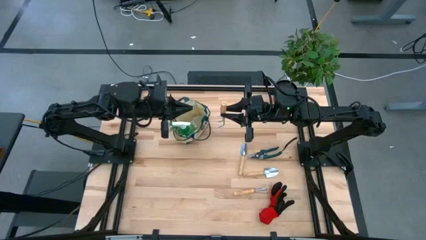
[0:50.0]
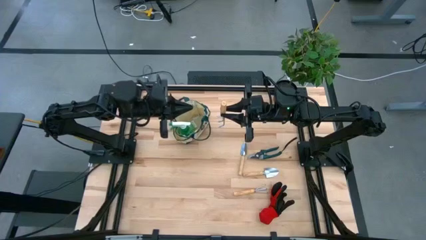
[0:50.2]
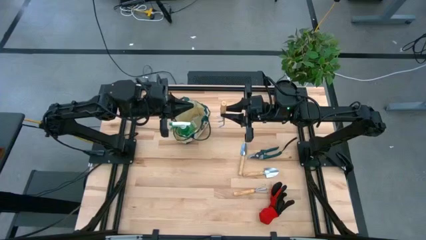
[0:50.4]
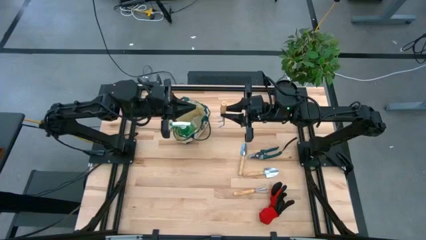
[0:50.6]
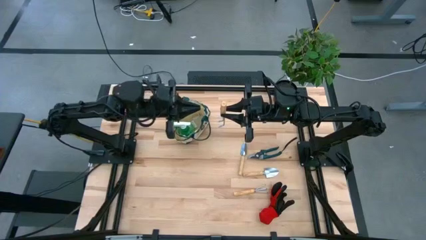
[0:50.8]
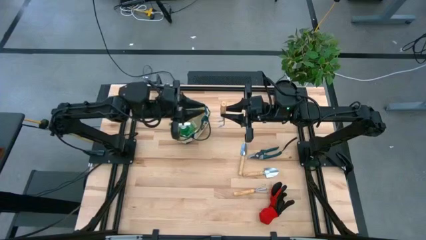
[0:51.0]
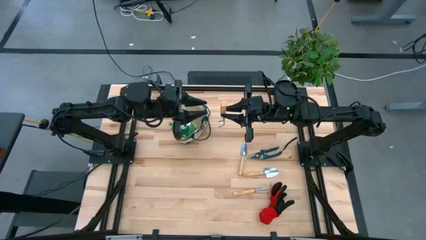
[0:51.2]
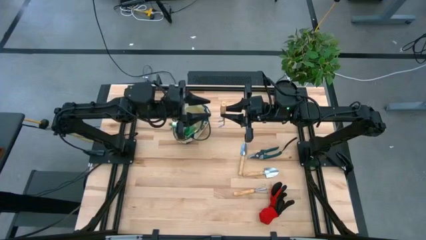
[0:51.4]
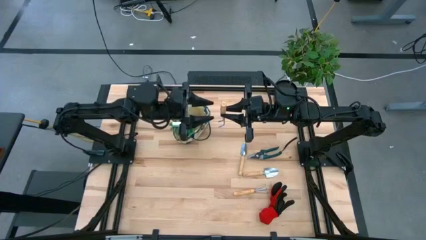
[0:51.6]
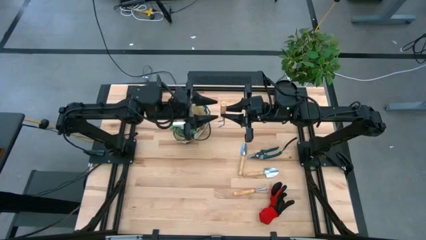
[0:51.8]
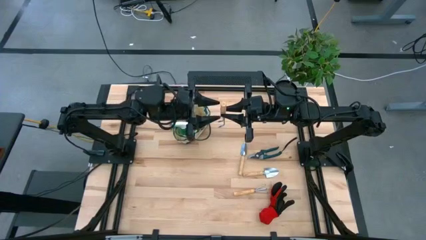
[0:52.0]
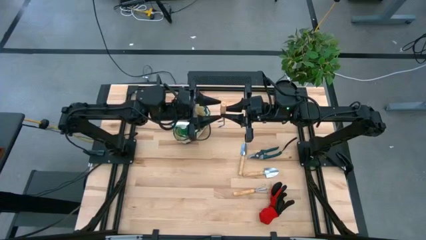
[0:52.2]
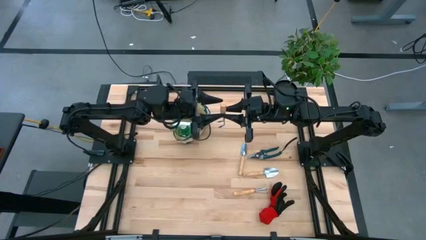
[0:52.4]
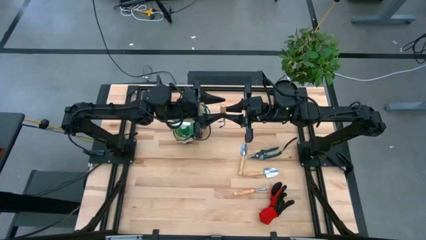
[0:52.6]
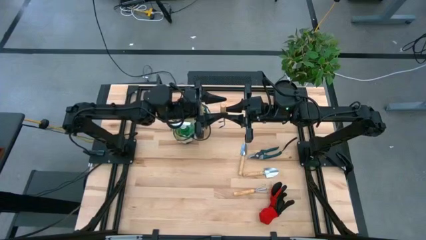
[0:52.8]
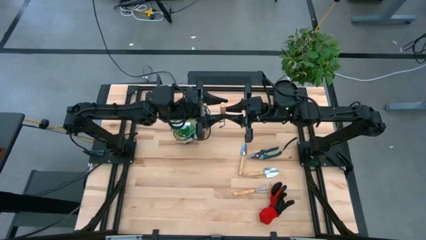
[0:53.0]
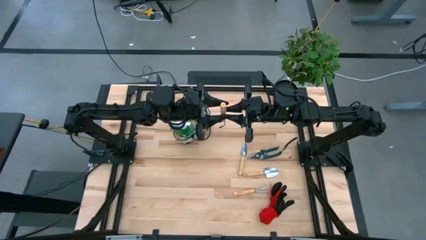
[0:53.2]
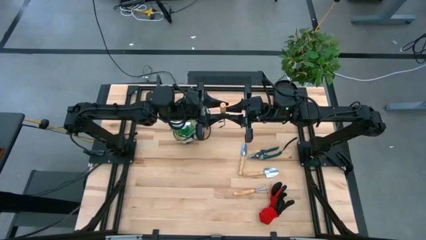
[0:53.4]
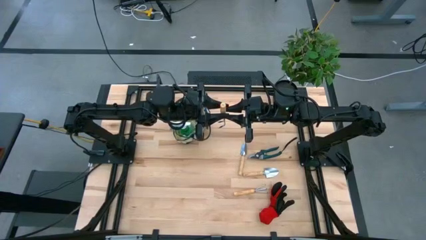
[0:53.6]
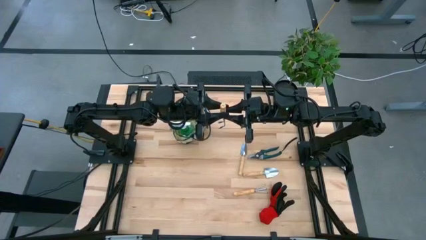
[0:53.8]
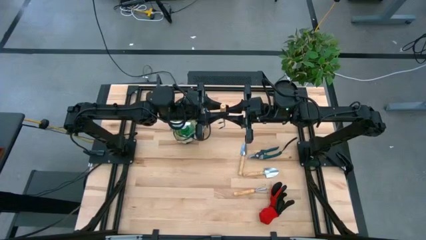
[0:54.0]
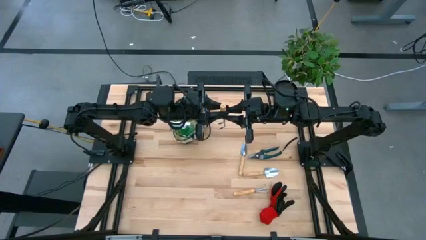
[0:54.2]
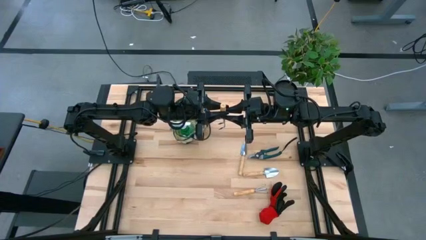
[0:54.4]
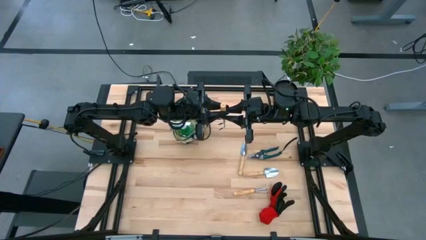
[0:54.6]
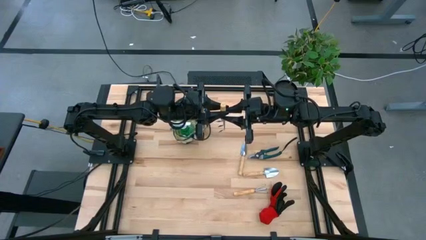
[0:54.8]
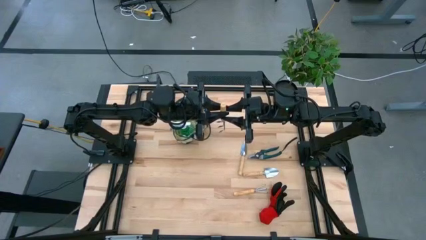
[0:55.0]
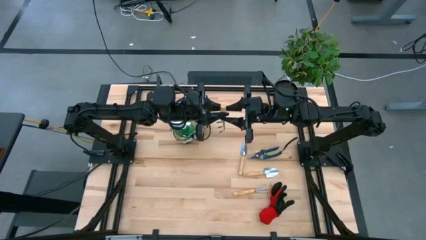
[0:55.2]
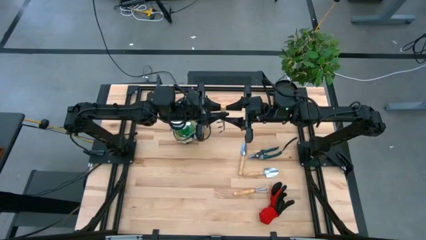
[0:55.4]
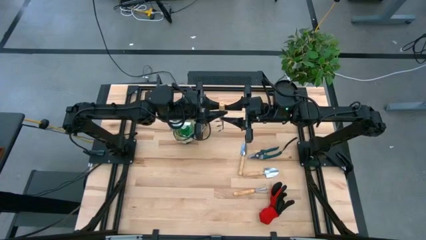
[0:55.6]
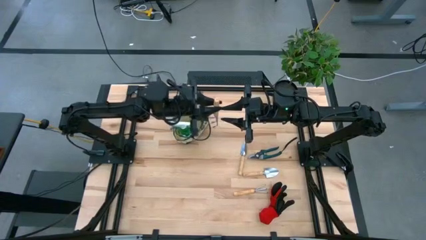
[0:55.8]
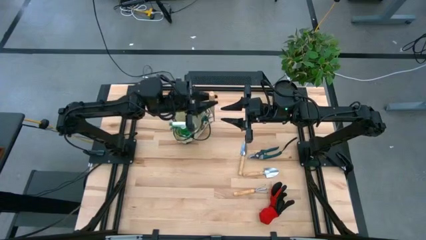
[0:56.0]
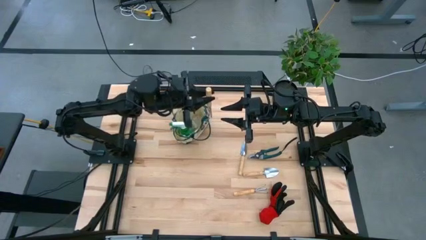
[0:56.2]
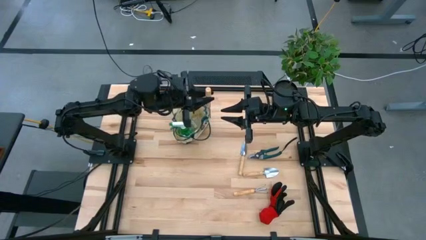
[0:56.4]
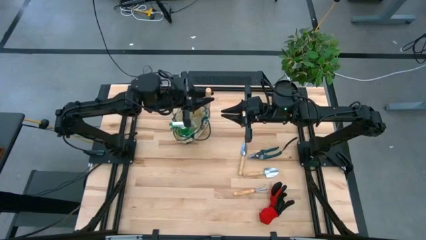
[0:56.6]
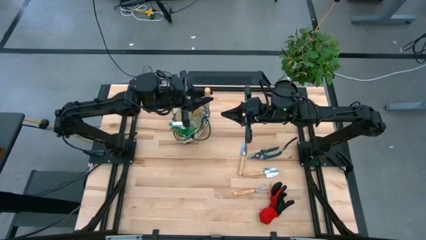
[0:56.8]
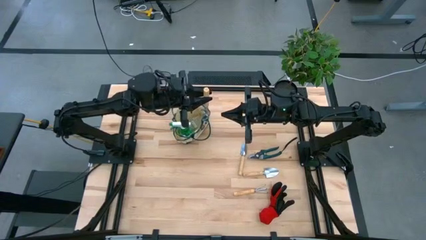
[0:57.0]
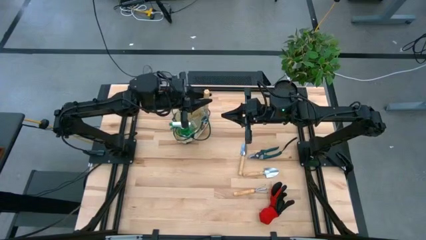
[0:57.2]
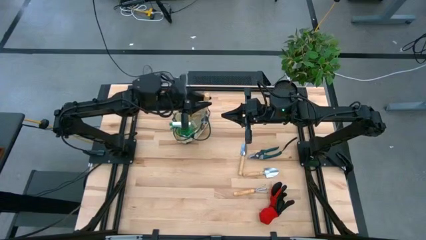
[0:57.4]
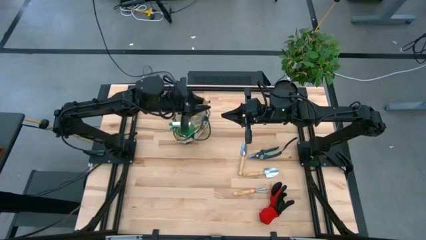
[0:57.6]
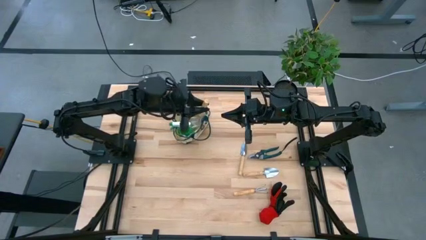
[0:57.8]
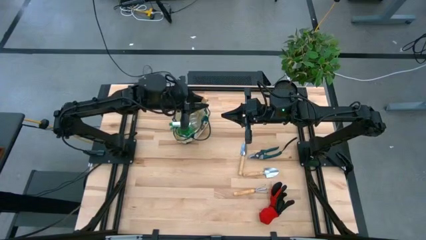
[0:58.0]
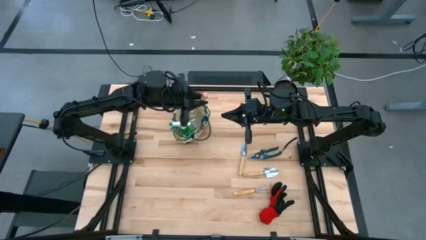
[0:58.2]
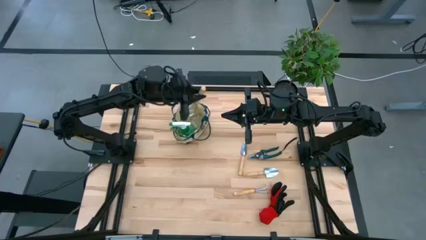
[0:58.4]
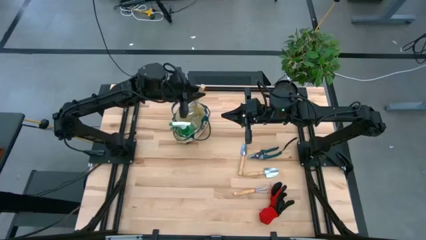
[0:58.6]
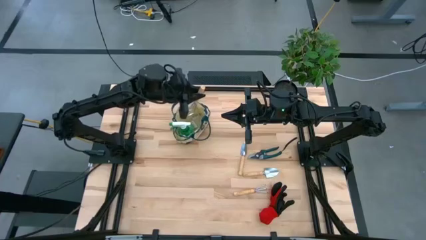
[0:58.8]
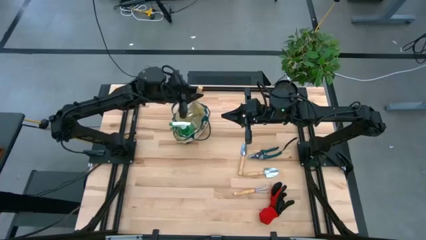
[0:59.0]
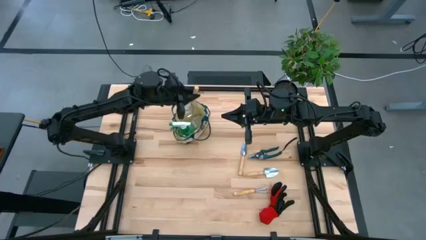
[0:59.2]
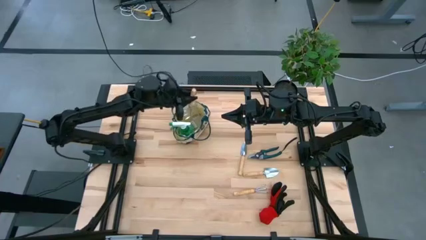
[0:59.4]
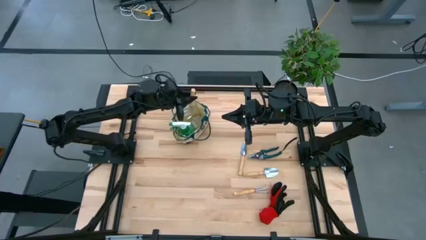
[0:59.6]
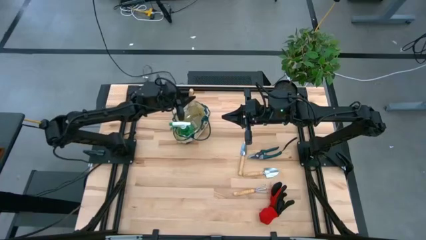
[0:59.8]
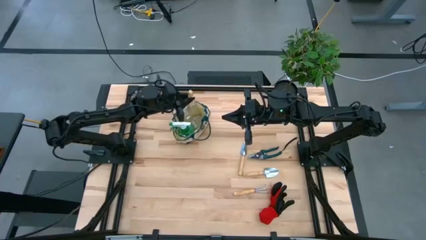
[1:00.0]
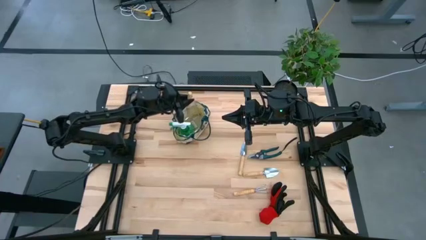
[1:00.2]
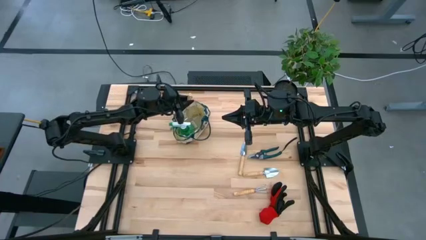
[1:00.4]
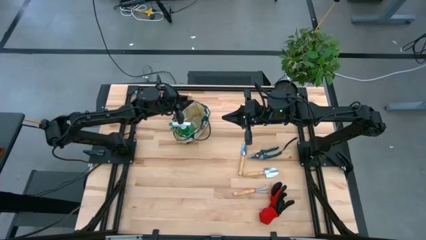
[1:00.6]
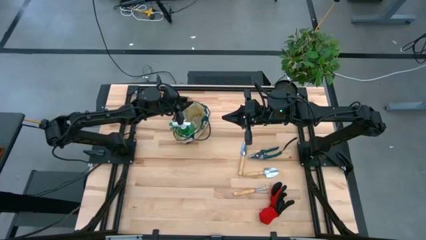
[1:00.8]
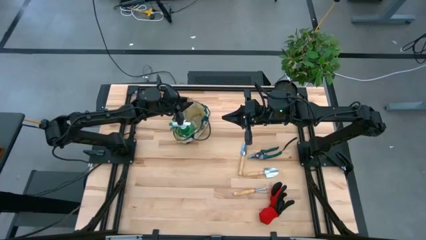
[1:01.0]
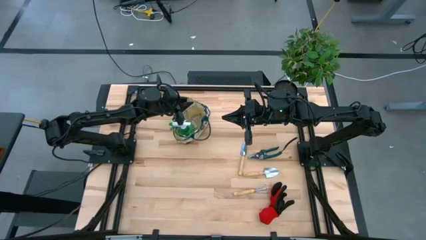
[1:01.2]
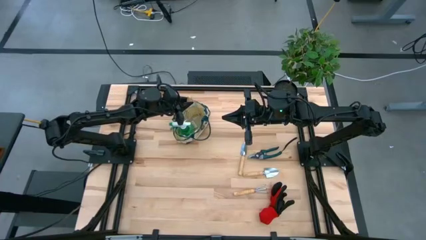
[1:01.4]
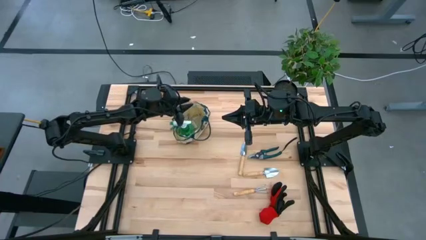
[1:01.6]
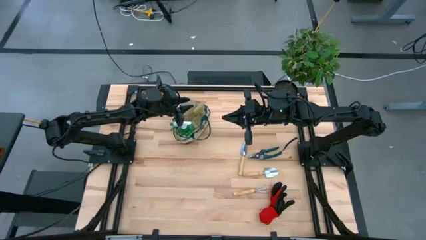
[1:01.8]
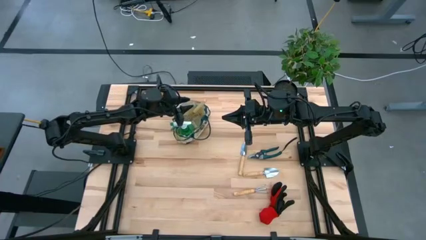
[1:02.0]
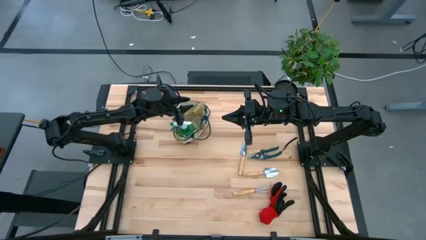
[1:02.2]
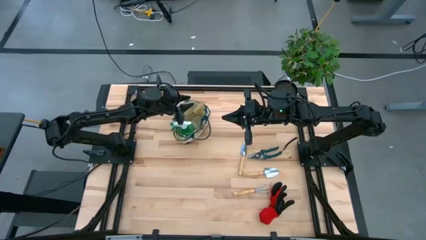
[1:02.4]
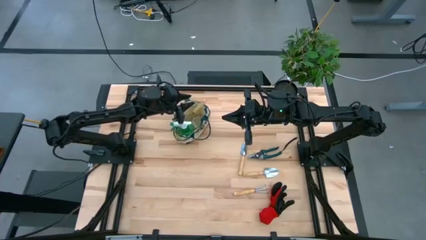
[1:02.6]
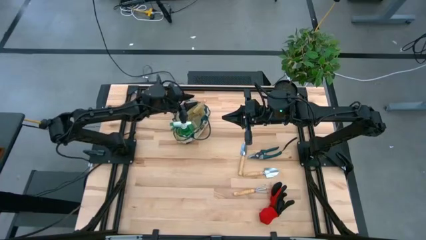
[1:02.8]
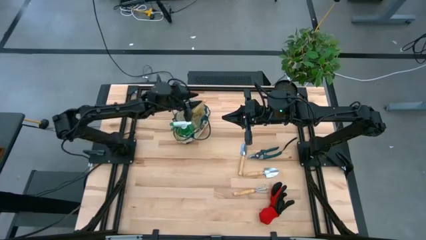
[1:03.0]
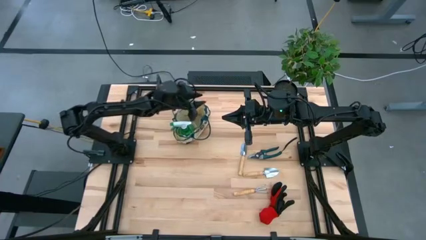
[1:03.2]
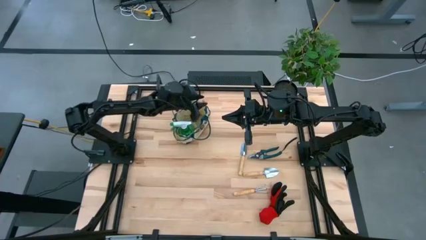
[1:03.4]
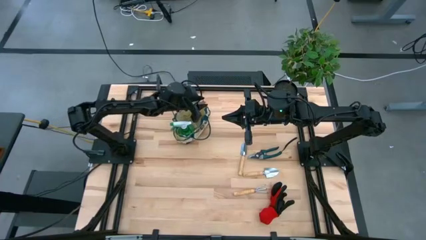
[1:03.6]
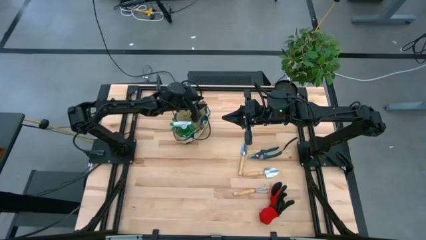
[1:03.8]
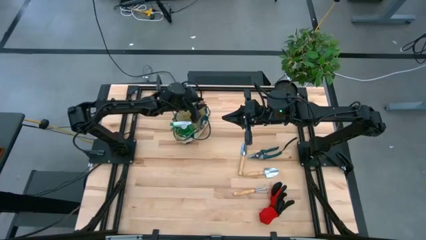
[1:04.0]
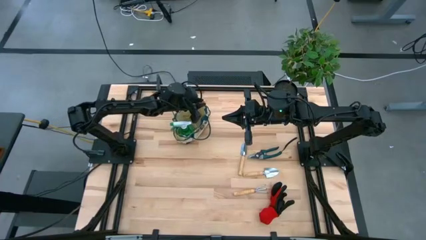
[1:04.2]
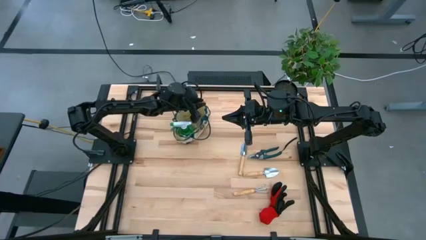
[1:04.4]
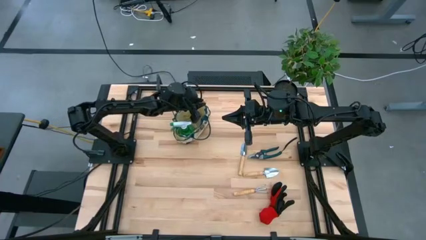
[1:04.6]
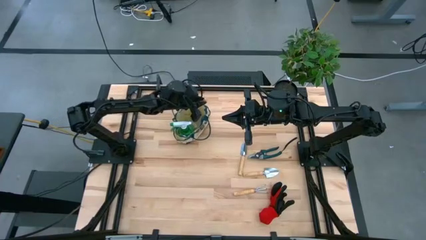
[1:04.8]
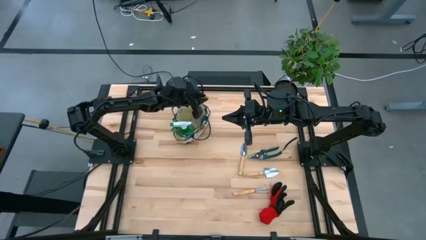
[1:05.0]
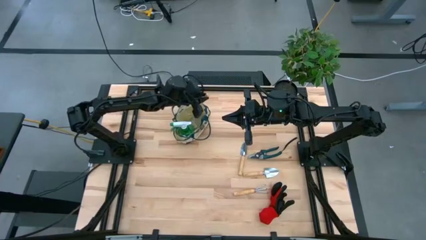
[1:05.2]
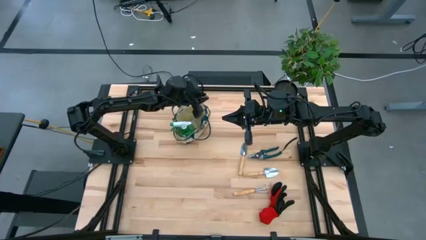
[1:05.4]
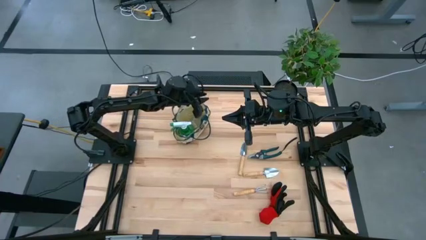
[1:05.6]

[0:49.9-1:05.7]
Task: Pick & Place Garden tools in Gardening bag
Put the top brown hand rake into the gardening bag
